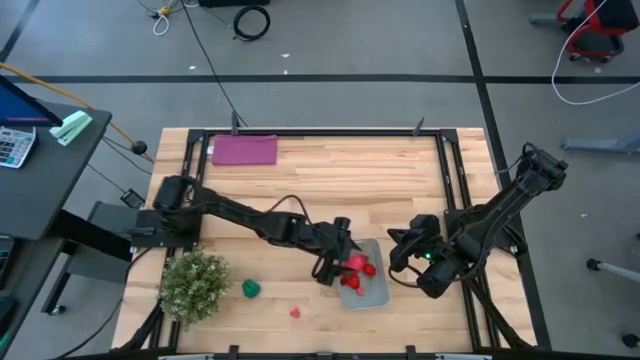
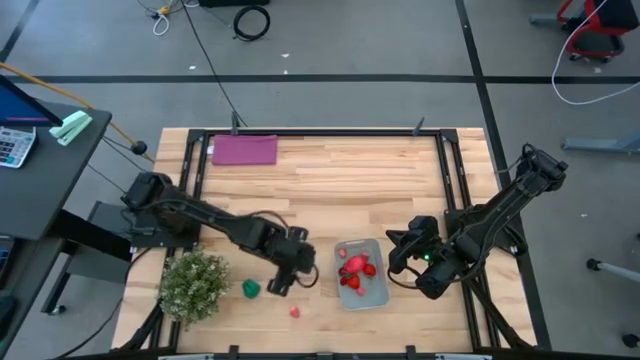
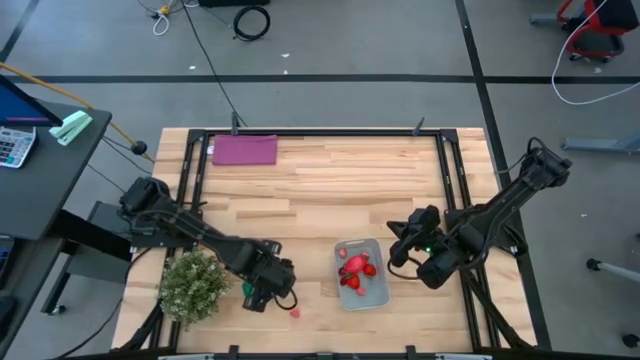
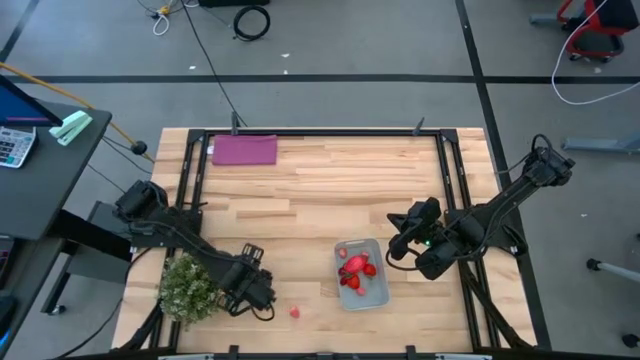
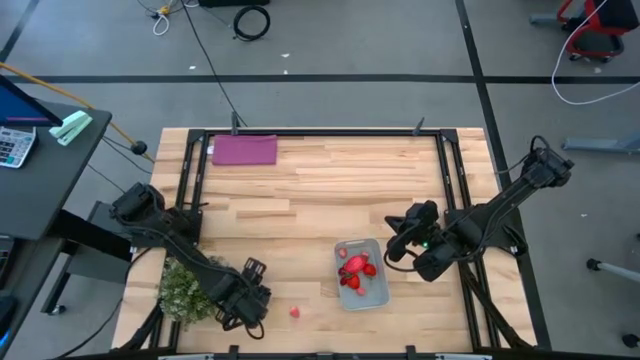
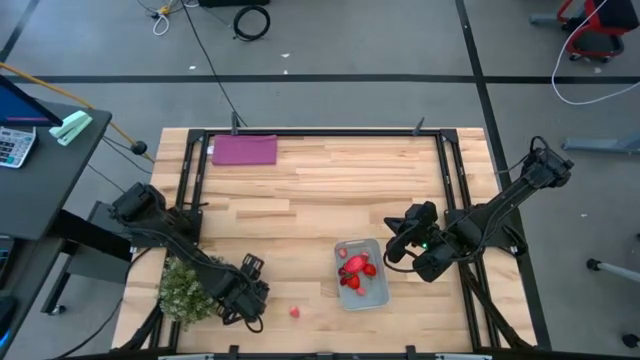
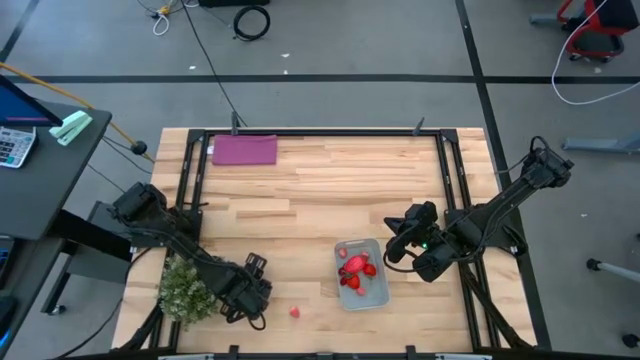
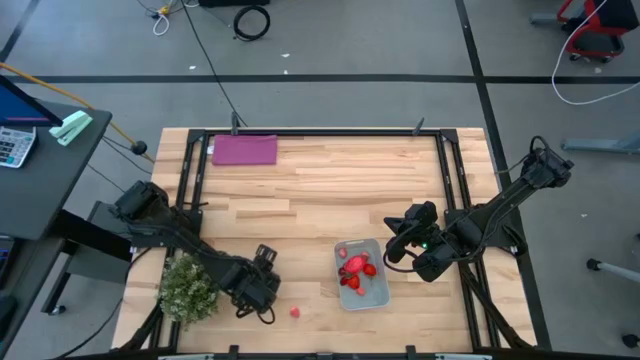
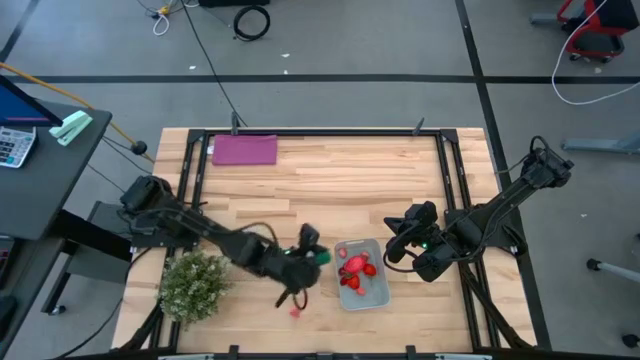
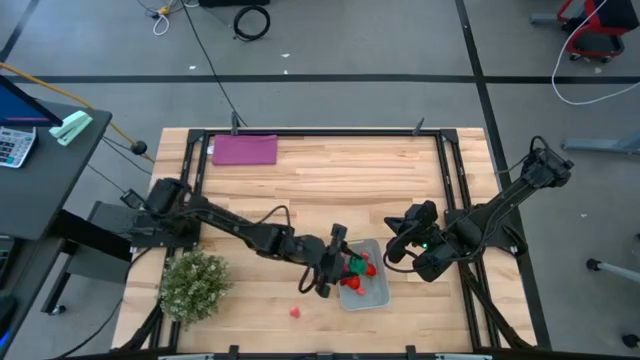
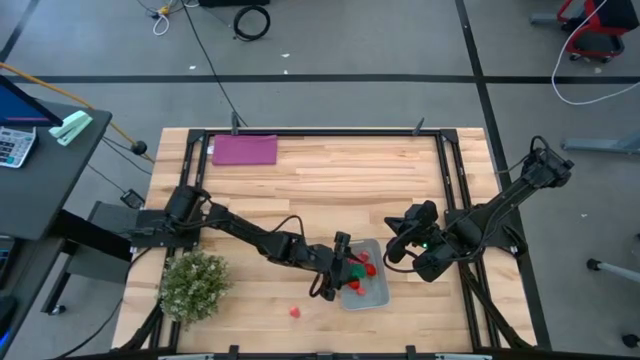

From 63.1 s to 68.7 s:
Task: Pick and placing Produce into tupperware
Put the green bell pepper into the gray bin

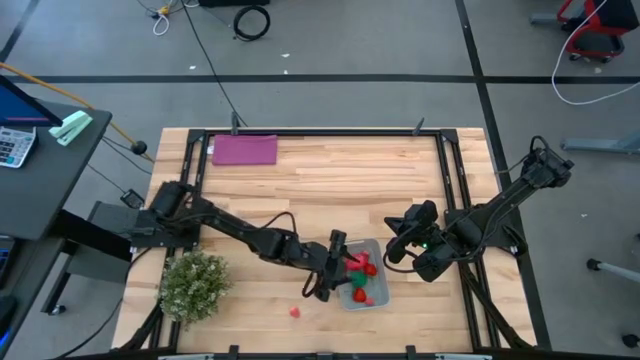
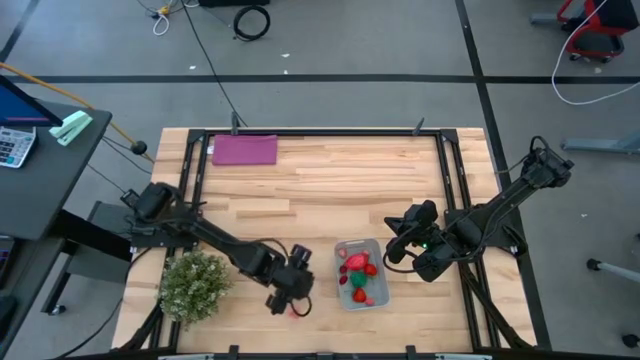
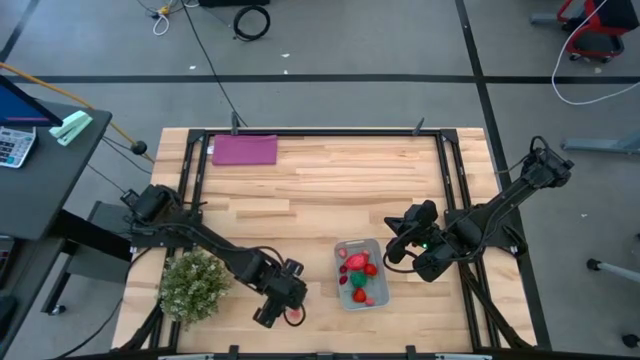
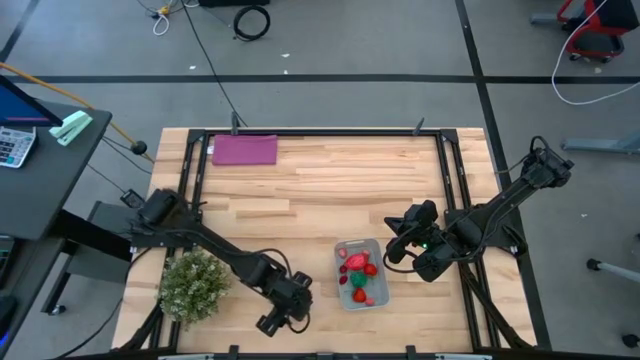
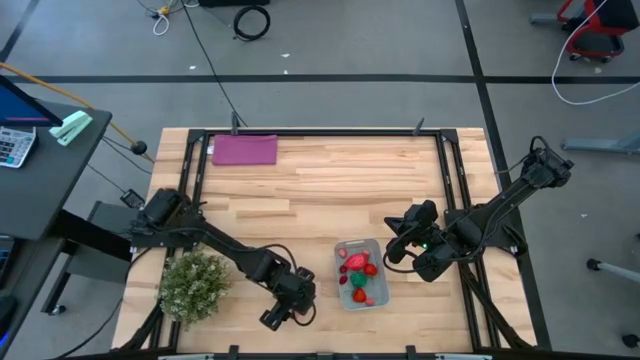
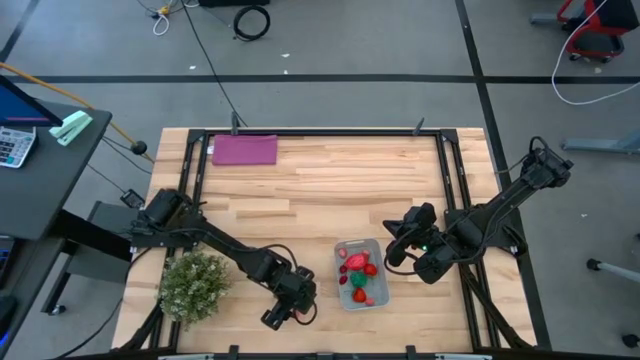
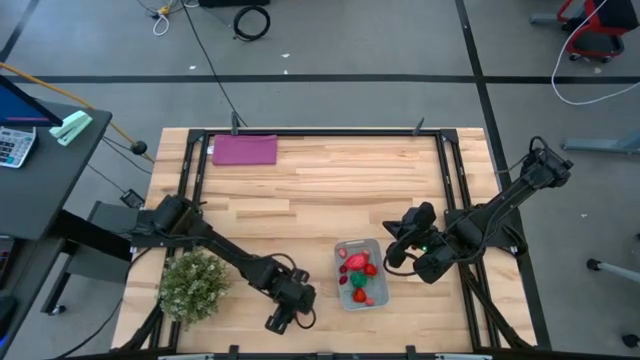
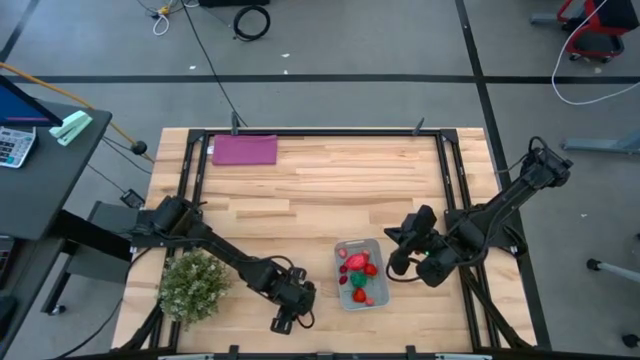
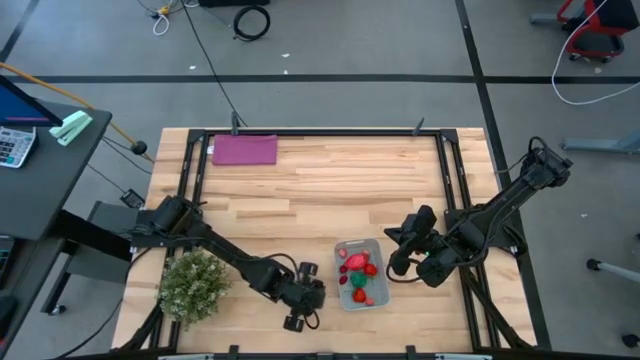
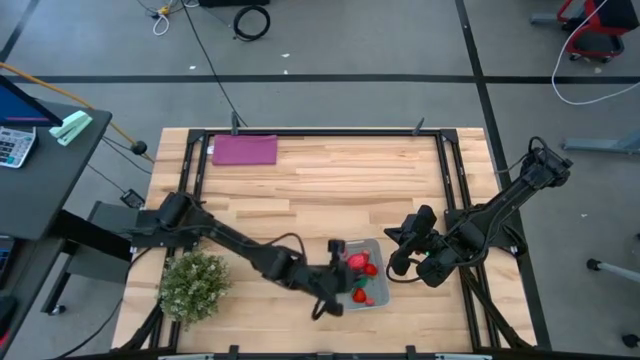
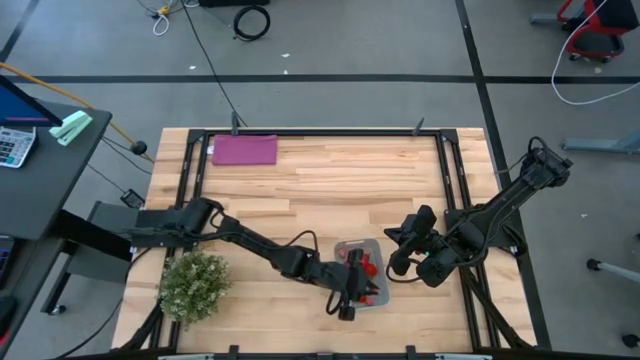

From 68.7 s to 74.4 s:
Put the pink peach into the gray bin

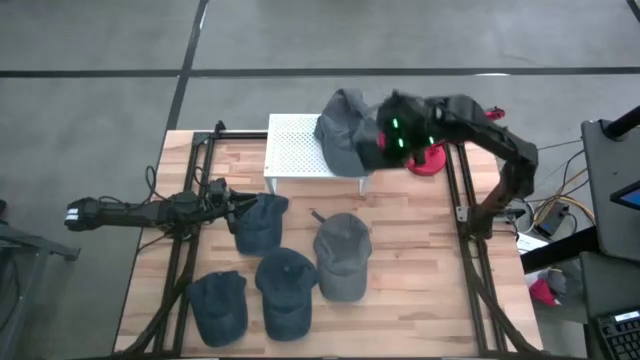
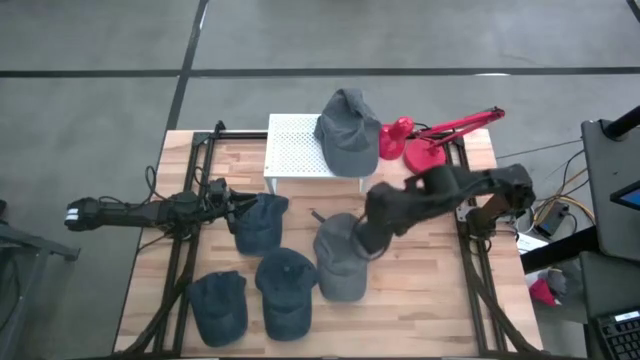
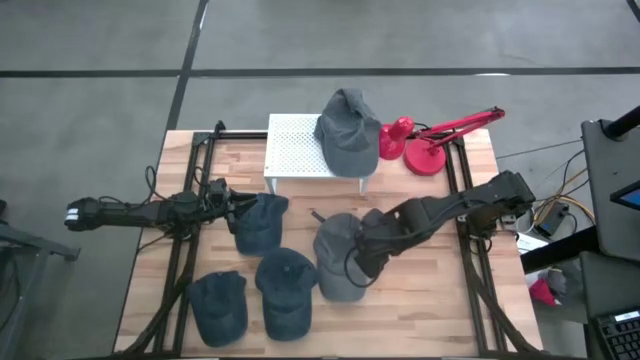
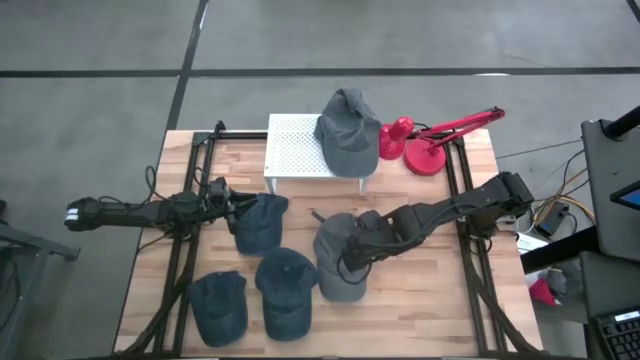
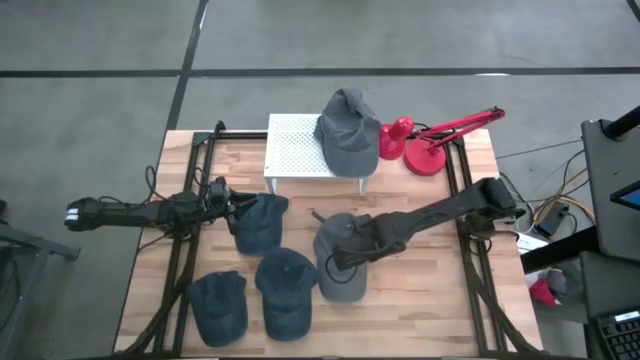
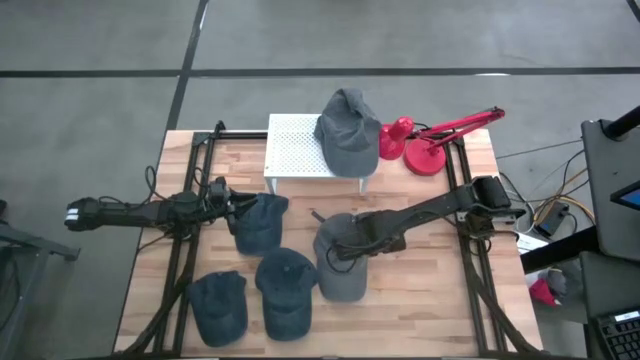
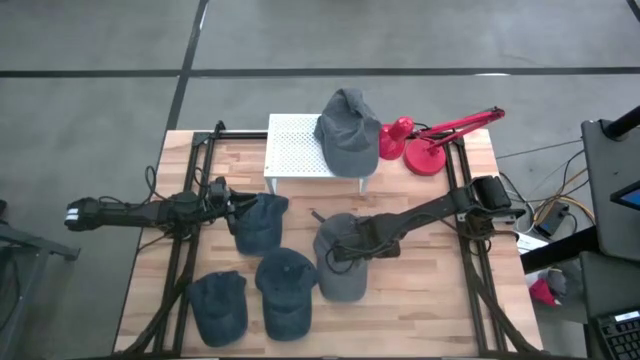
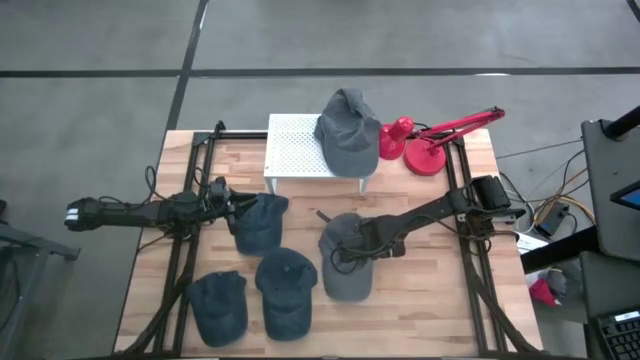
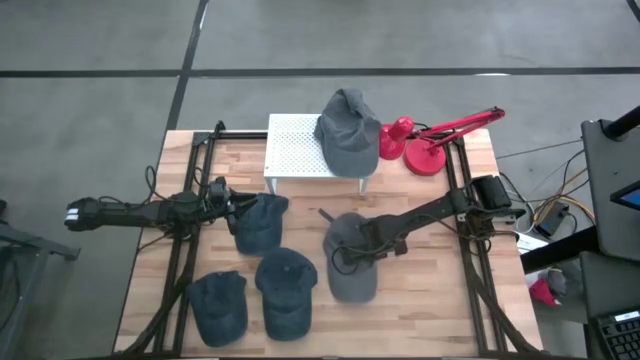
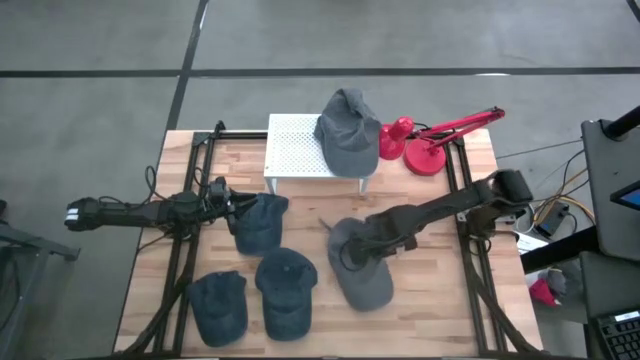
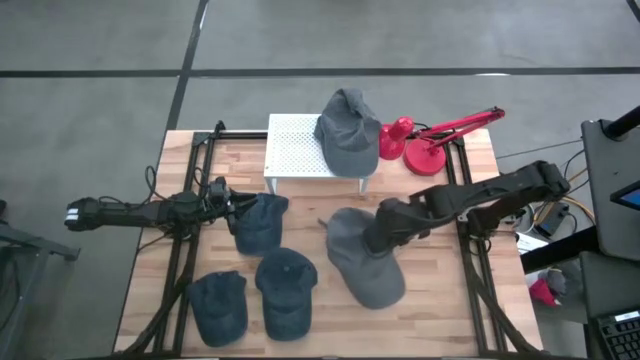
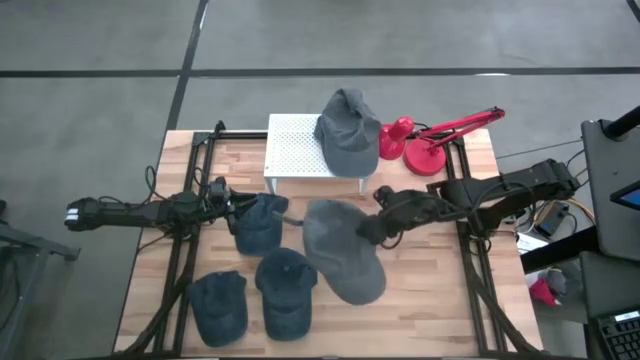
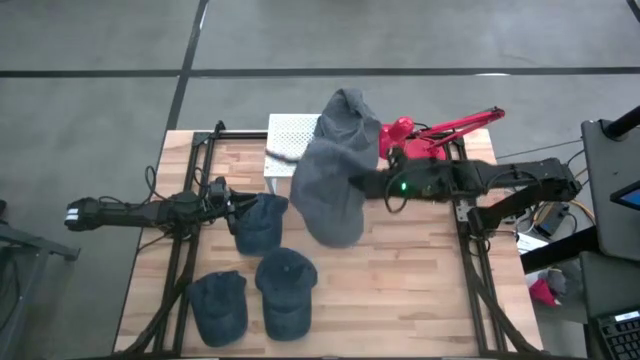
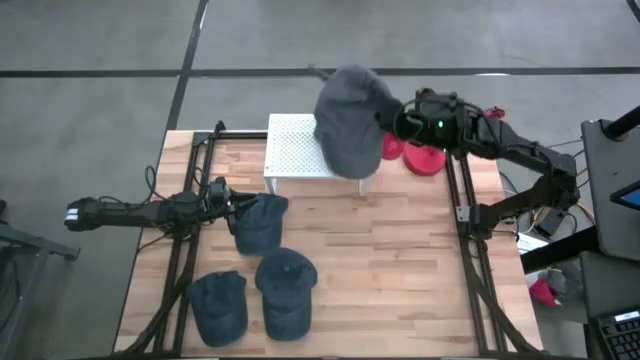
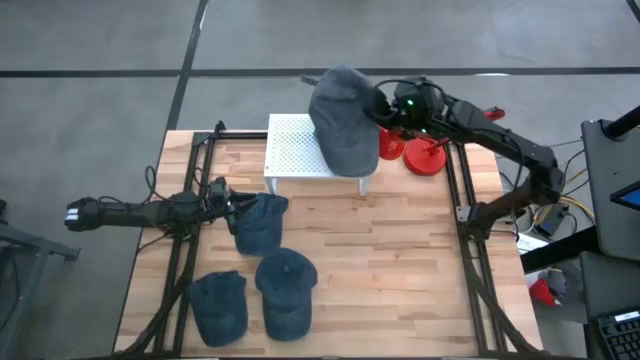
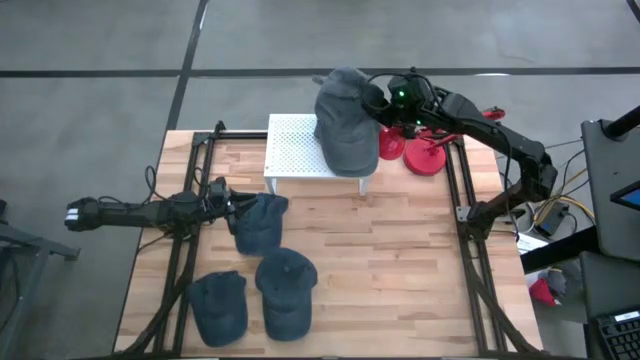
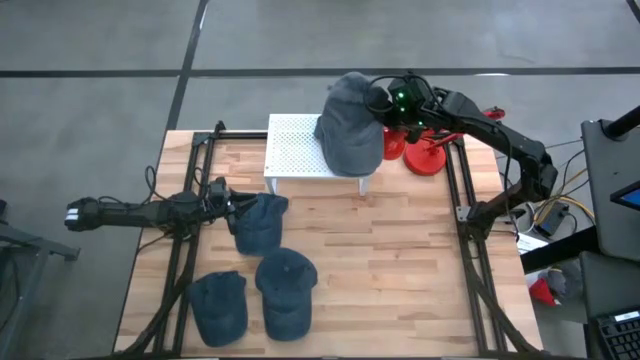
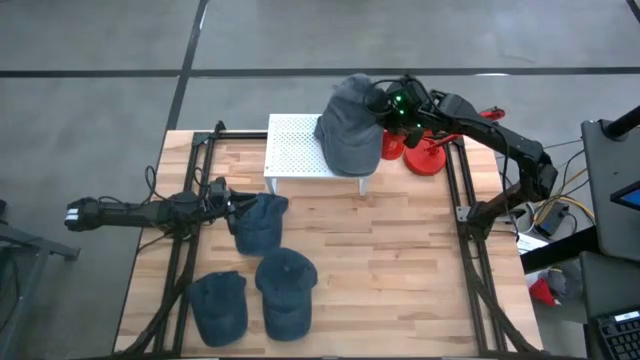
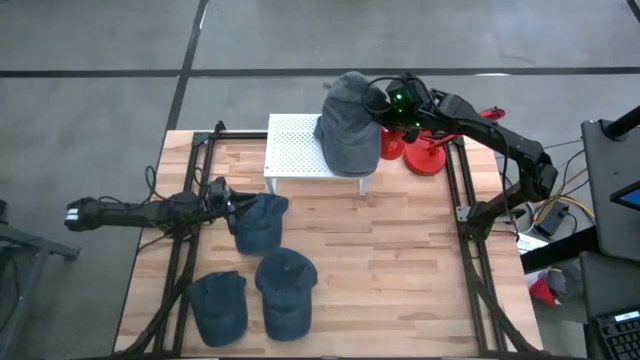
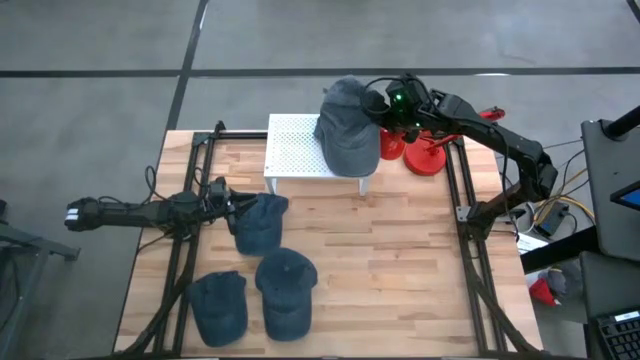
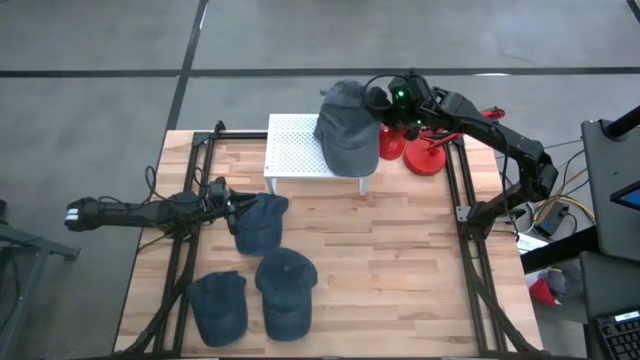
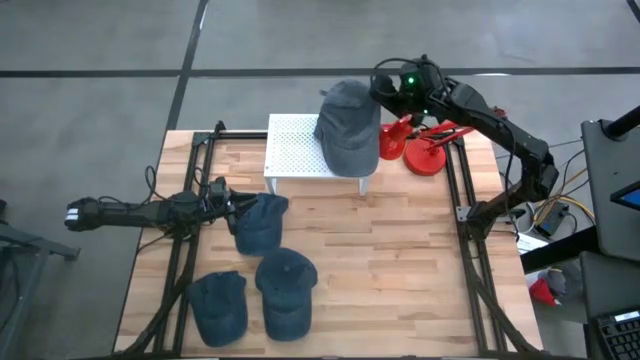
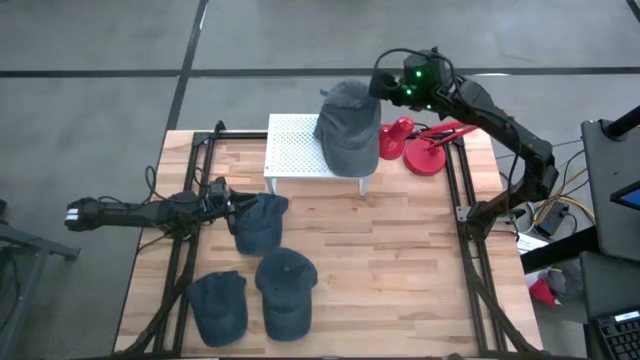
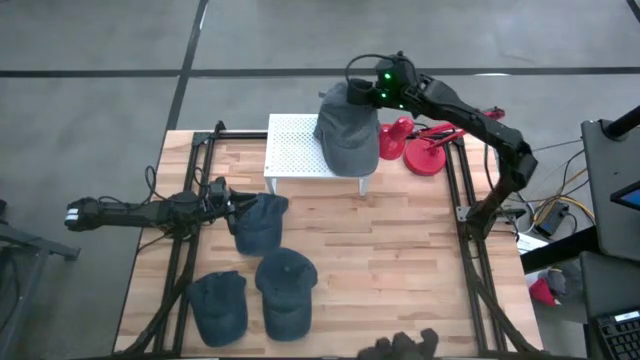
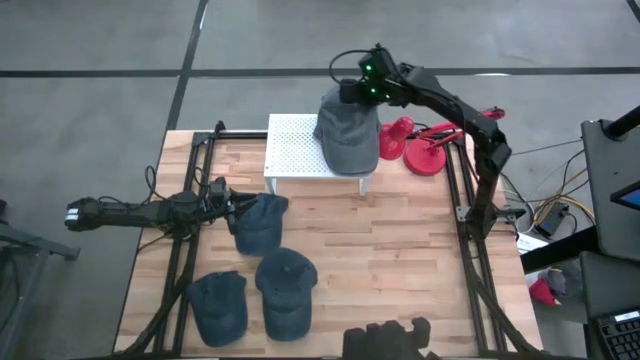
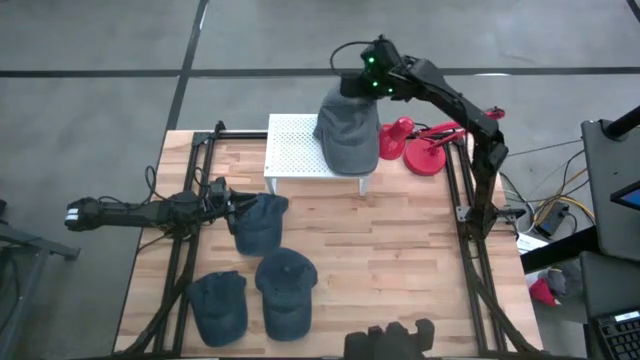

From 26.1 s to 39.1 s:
Task: Pick & Place hat
Stack the gray cap on top of the gray cap on the shelf
